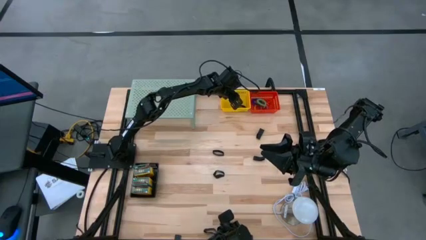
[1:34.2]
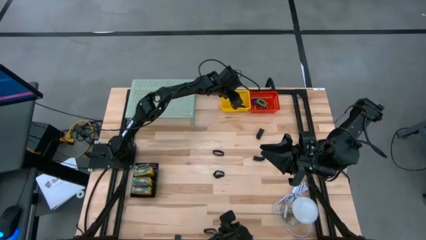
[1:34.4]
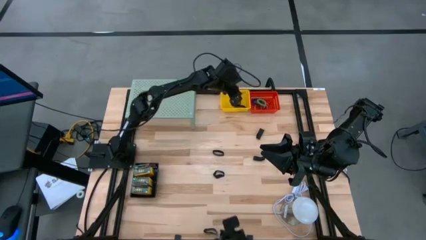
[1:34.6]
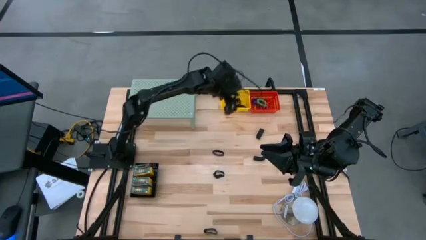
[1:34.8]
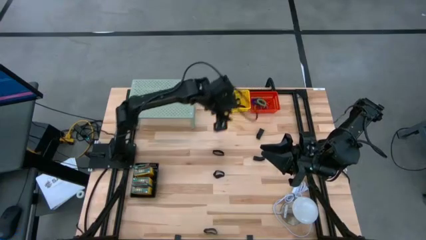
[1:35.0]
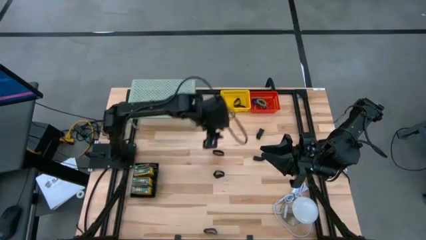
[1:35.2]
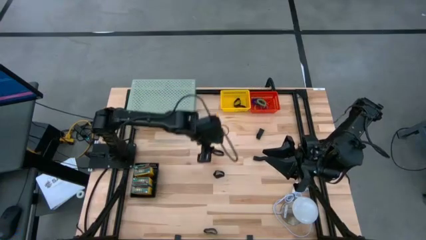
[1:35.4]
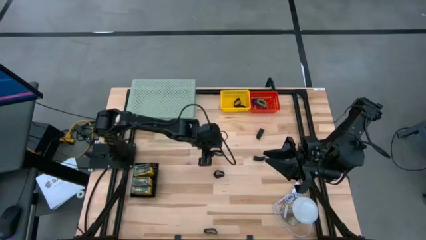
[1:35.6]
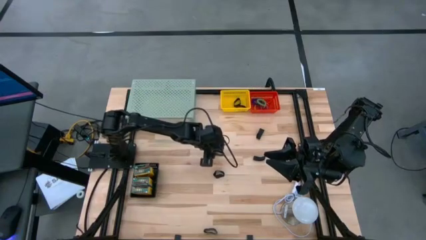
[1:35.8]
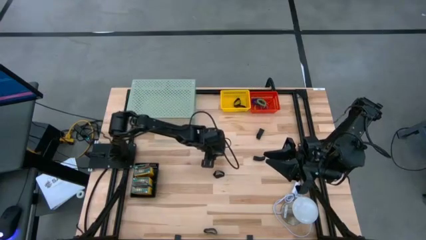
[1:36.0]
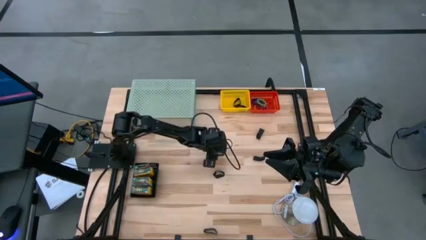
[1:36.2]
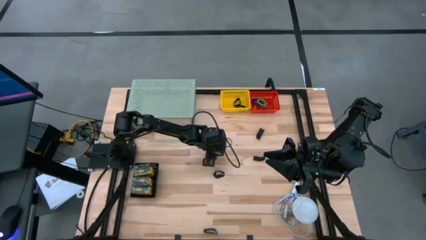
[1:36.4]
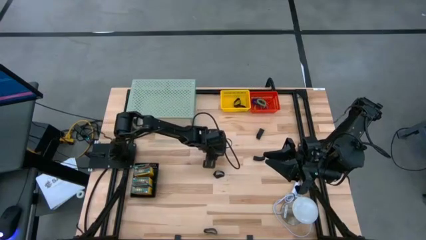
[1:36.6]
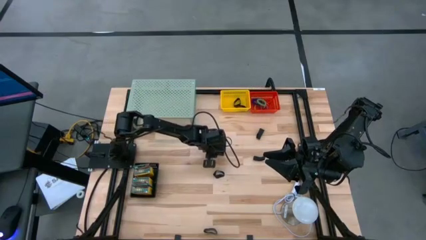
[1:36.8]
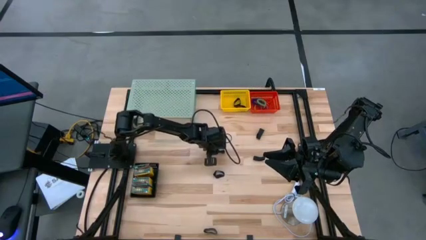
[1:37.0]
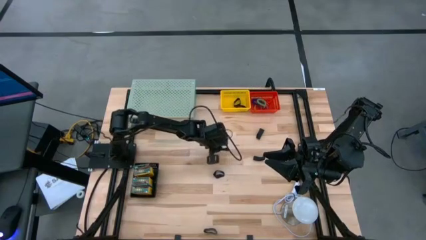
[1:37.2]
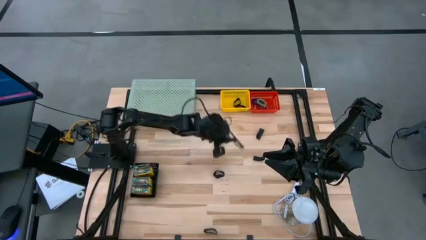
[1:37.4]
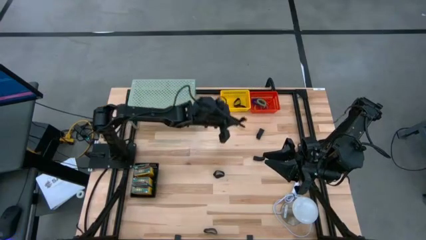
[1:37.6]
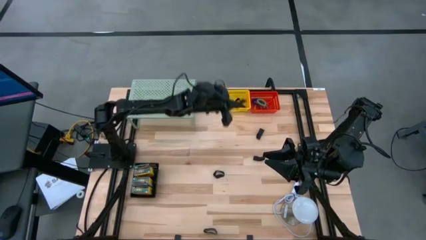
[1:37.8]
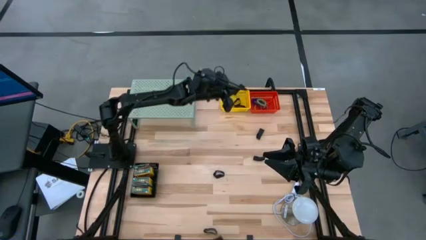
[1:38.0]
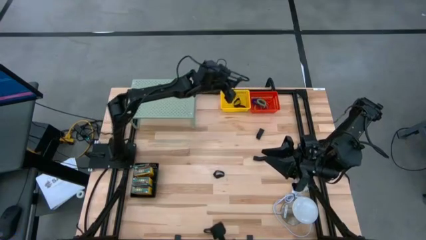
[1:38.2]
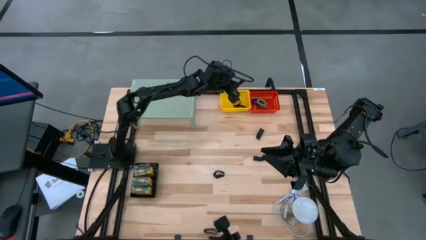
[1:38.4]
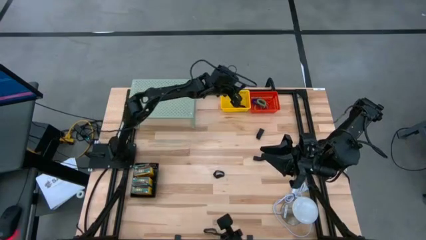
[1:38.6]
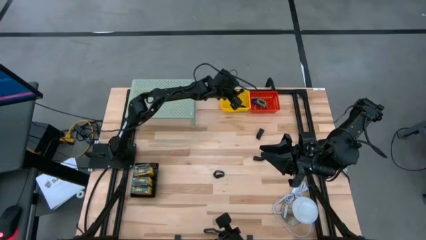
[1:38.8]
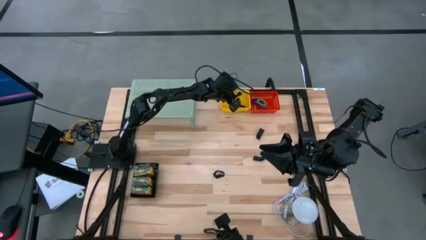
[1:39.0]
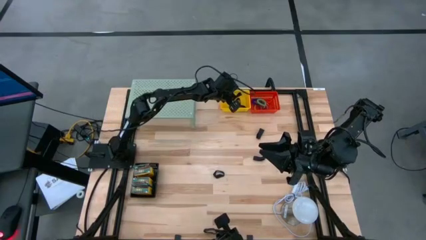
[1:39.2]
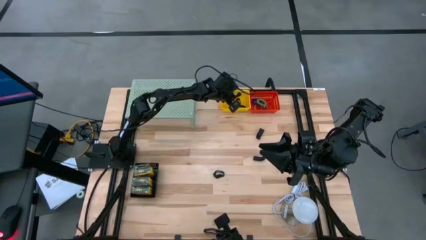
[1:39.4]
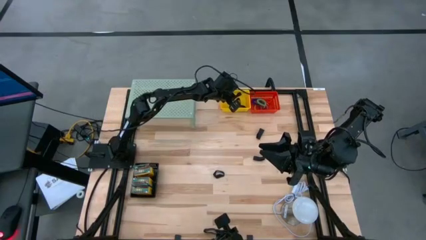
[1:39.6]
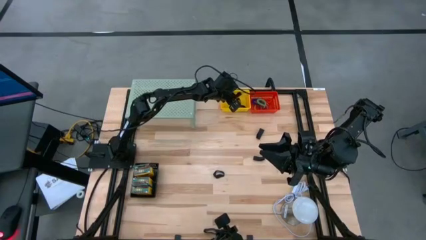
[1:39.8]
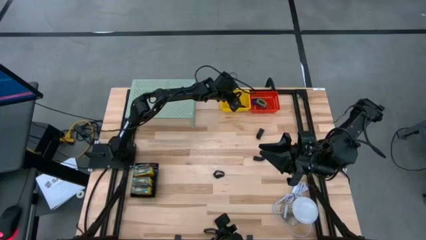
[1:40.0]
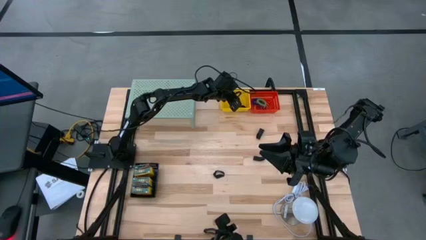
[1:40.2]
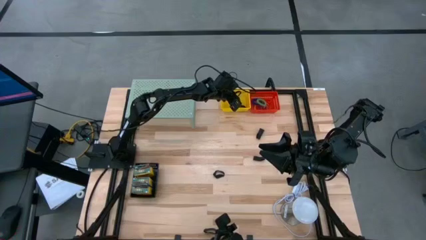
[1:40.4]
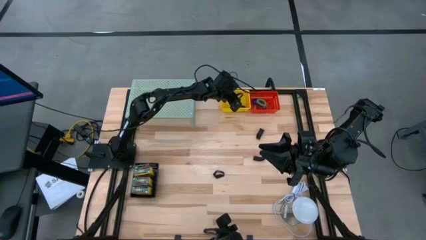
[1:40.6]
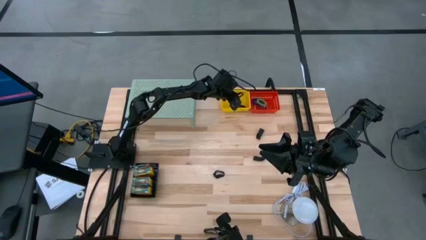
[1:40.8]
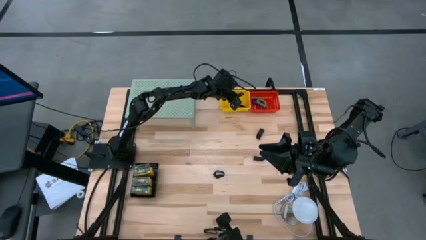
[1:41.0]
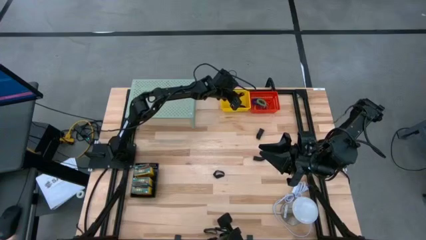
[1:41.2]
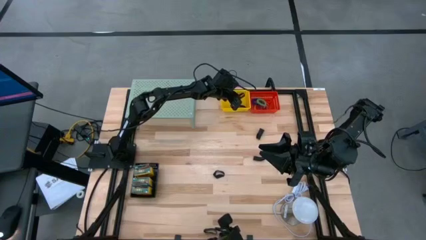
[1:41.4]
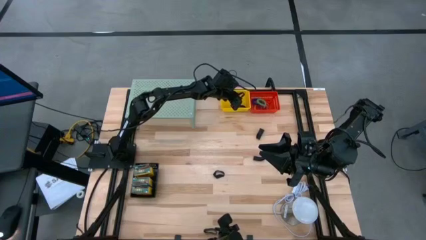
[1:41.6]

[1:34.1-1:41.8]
Task: Pick & Place Office Desk Supplies
Put the black rubber band into the yellow basket

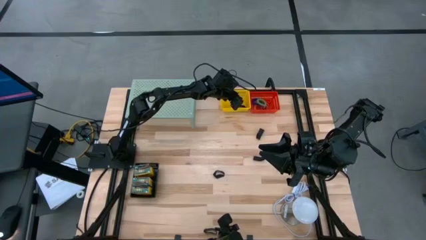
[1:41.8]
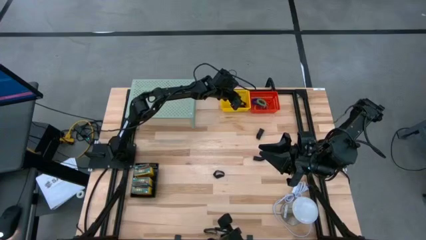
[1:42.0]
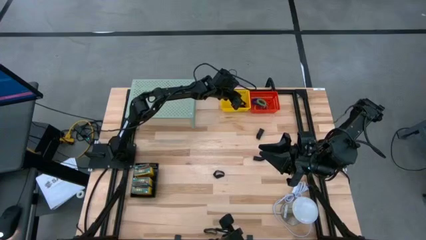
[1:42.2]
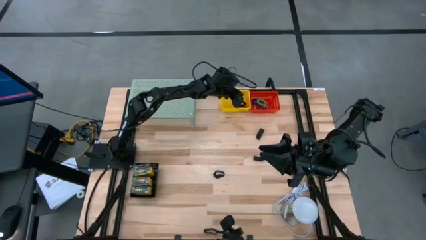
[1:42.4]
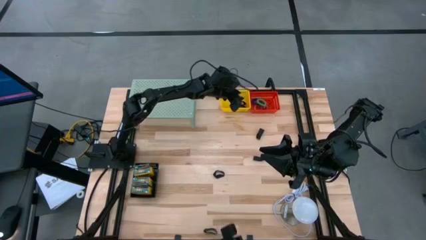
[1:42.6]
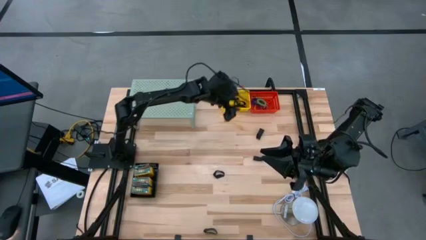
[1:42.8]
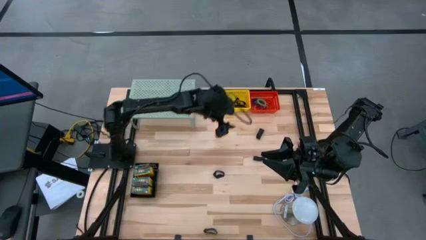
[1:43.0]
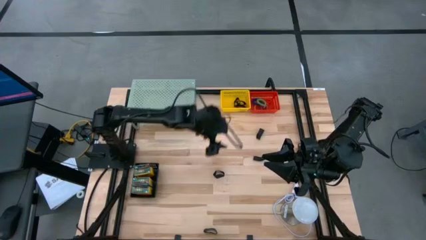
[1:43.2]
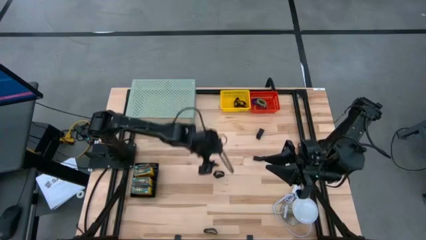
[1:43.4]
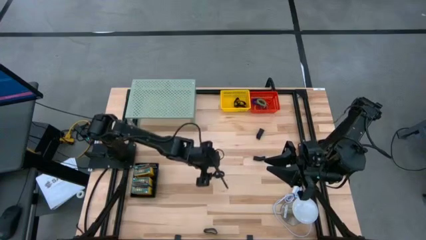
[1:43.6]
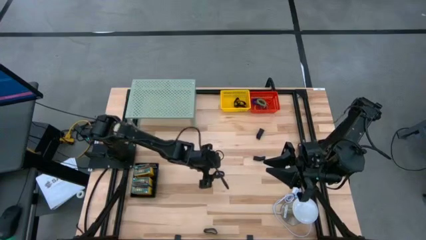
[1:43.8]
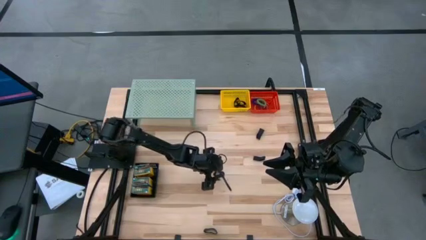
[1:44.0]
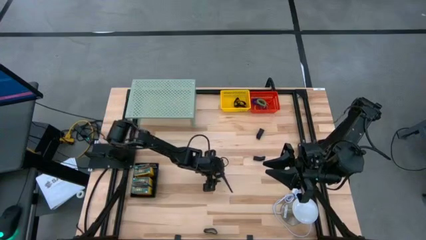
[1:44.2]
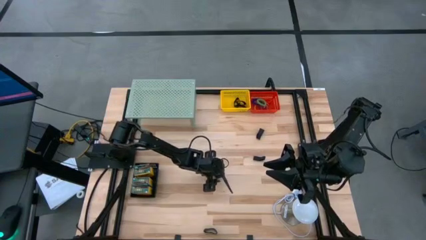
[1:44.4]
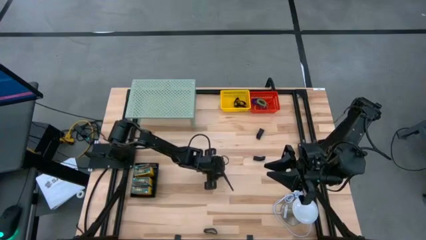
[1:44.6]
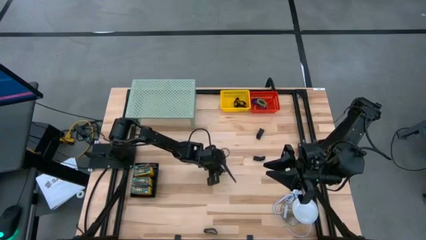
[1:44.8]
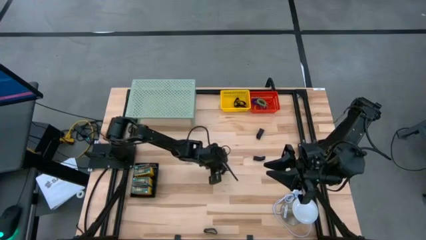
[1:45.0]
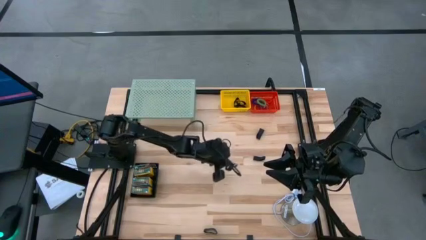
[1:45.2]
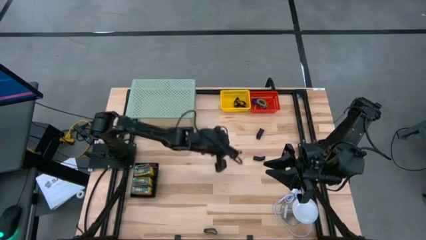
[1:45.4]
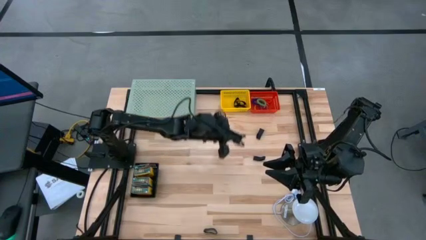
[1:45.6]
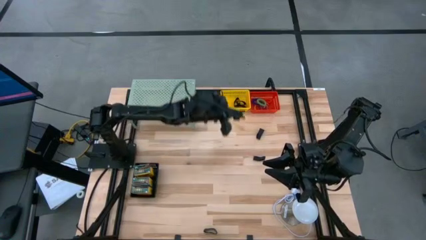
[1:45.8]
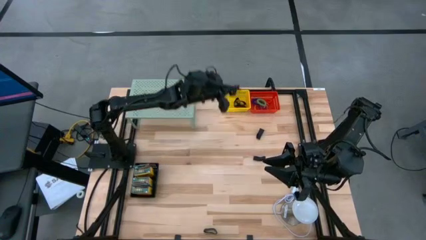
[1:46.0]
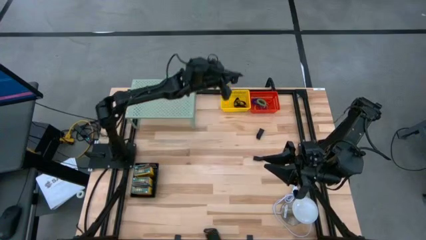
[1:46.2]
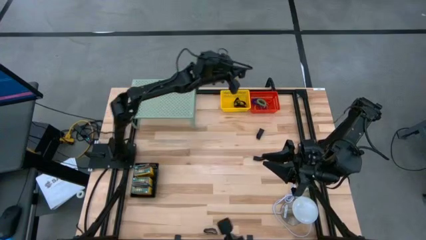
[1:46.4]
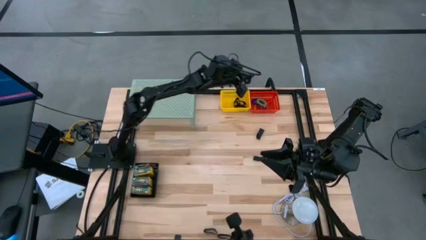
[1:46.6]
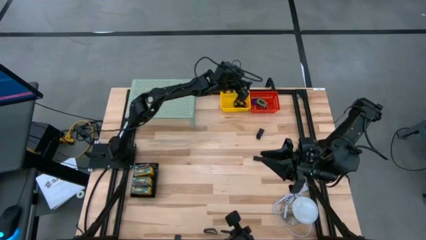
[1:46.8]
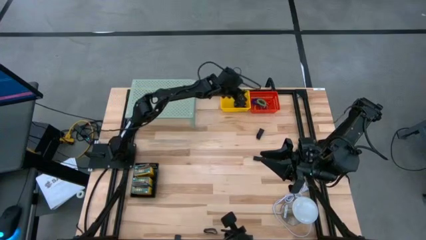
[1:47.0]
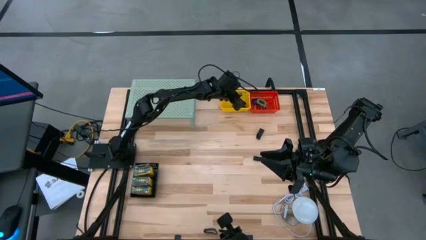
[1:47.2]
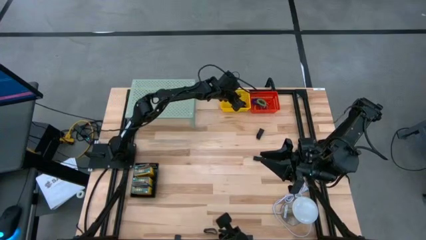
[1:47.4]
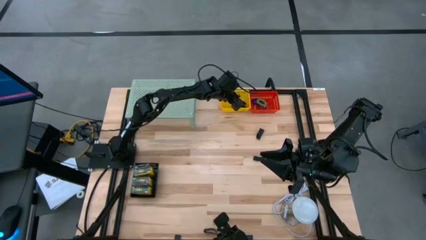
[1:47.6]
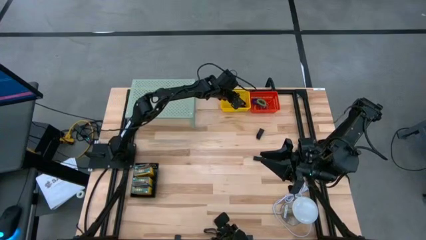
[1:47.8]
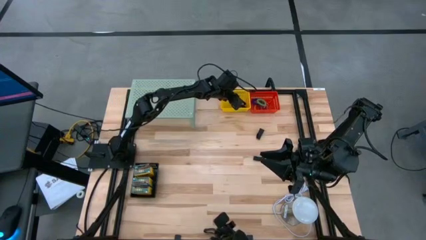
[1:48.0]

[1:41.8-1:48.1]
Put the black rubber band into the yellow basket

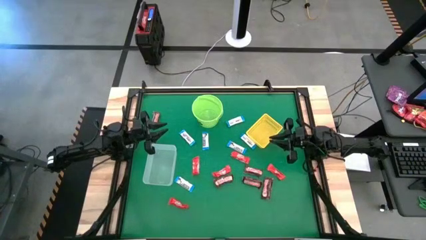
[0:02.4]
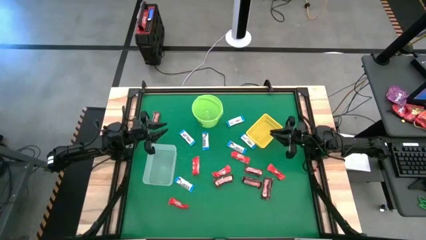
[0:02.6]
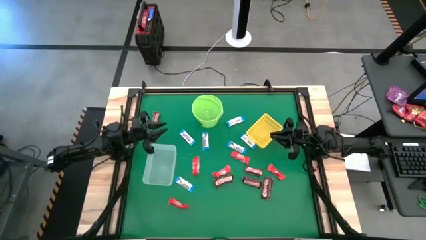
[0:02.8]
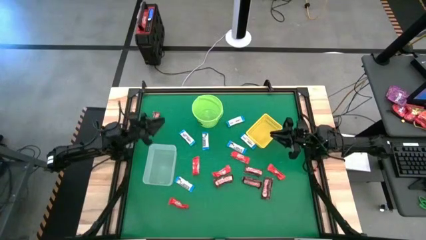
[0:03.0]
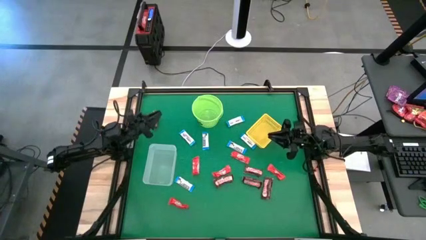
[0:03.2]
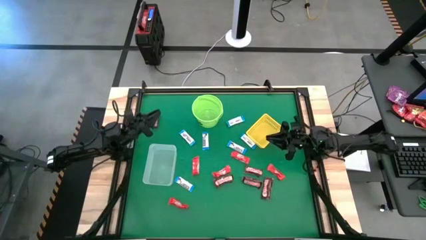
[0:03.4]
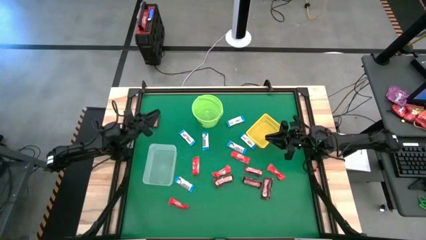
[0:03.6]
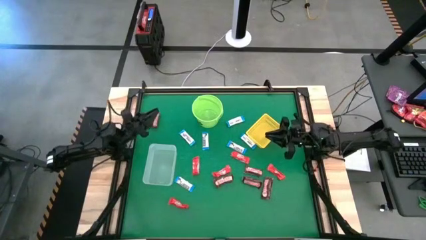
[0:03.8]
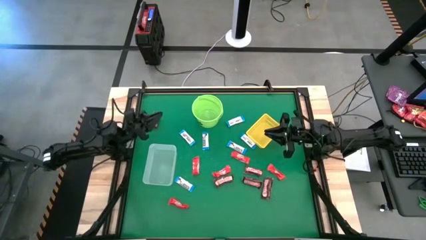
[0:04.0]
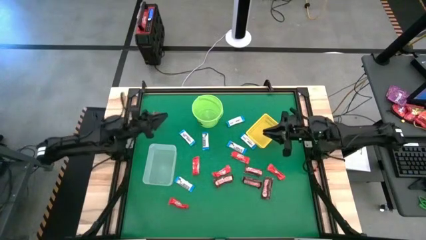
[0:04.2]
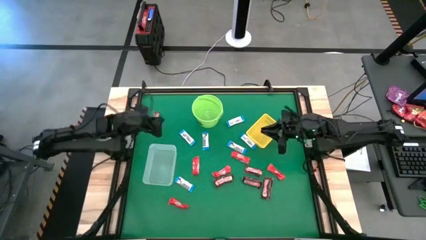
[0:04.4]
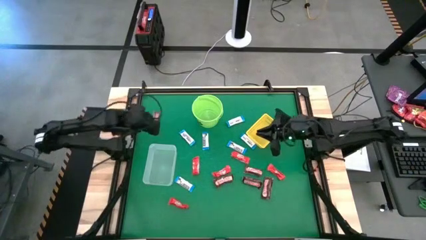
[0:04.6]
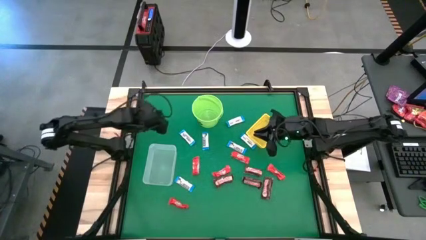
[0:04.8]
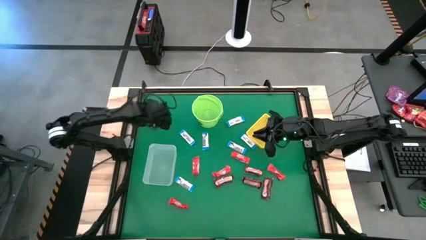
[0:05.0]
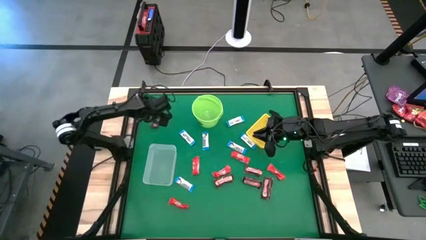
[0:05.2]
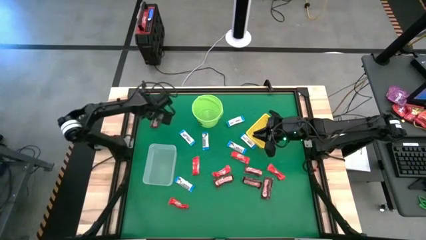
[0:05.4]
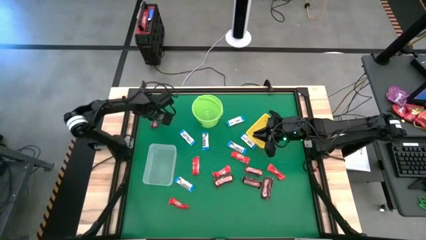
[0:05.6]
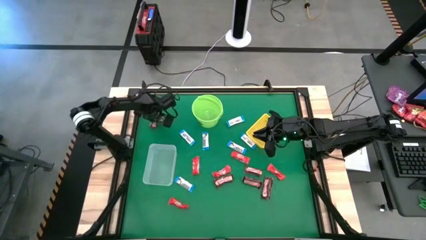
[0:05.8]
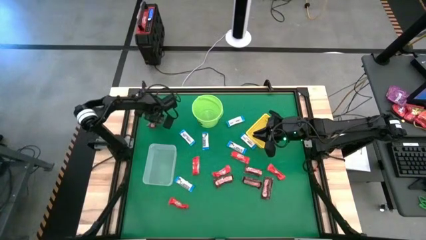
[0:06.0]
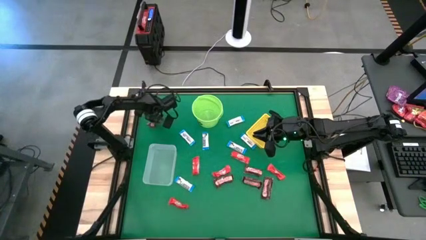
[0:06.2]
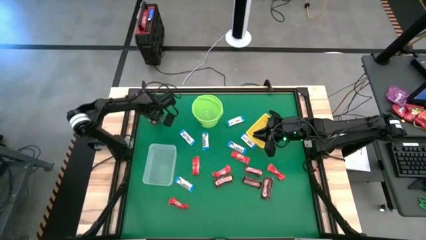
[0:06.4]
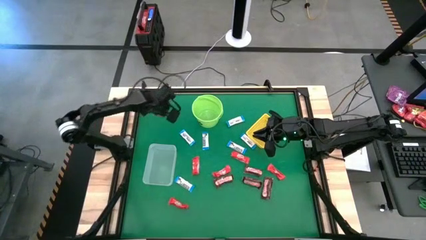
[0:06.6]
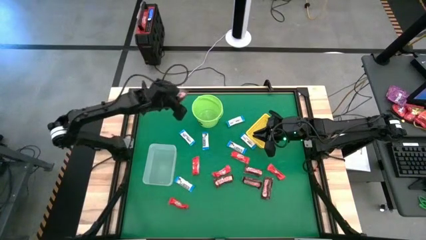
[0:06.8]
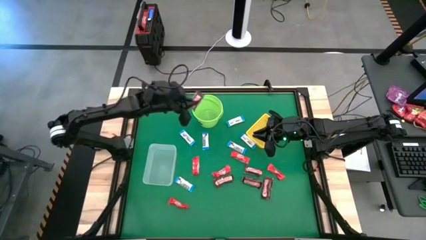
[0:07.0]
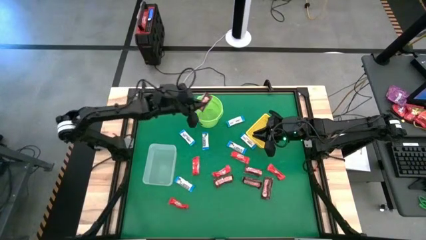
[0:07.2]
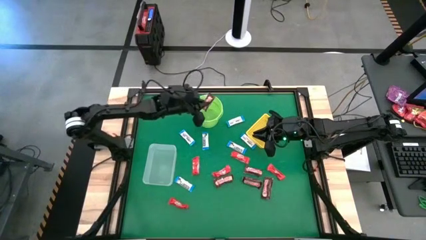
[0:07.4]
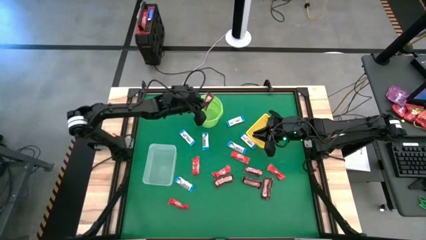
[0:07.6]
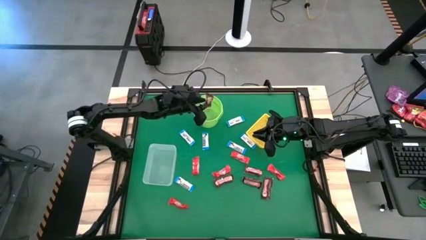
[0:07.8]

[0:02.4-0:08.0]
Task: Sort candy by brand, put in halloween buckets
Put the brown chocolate bar into the green bucket
